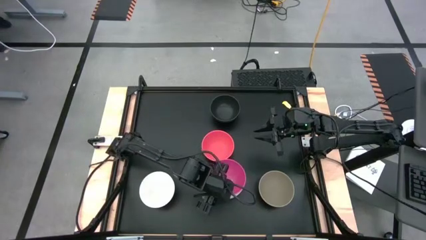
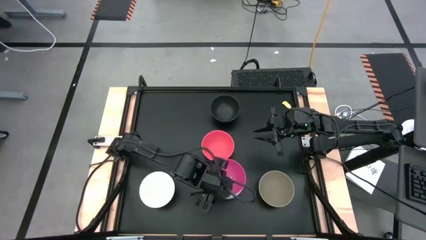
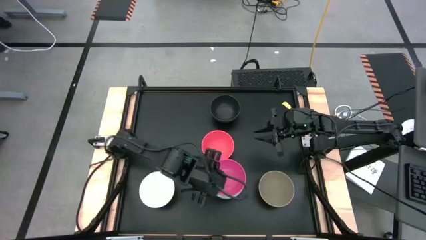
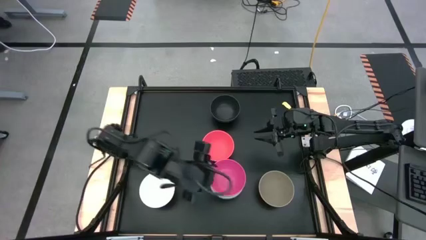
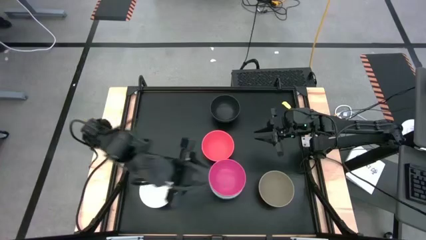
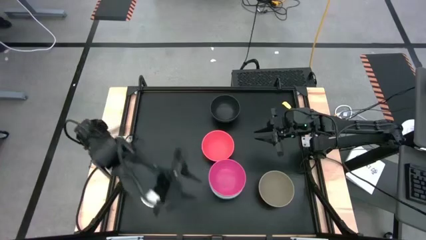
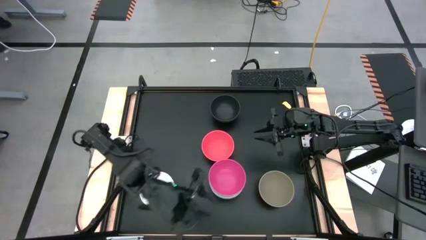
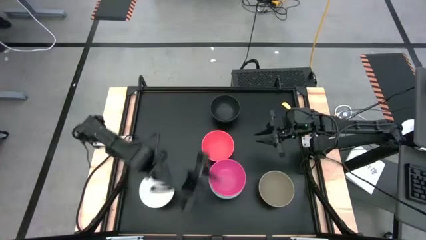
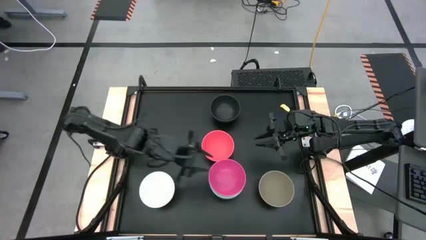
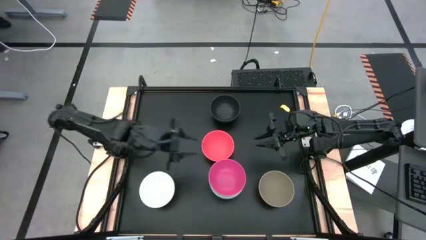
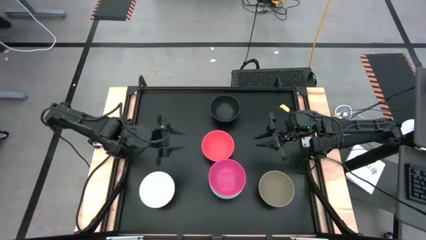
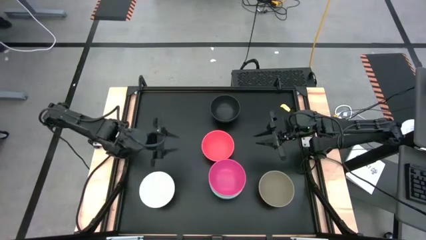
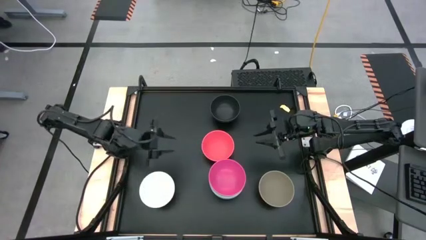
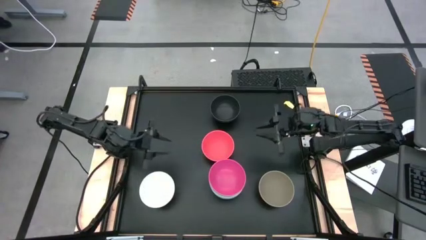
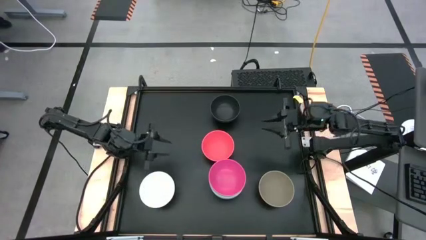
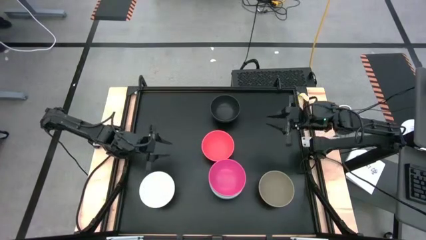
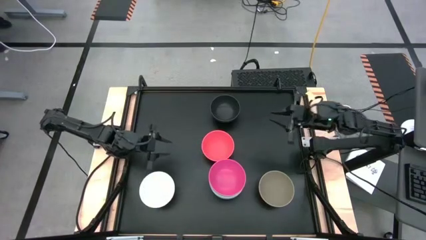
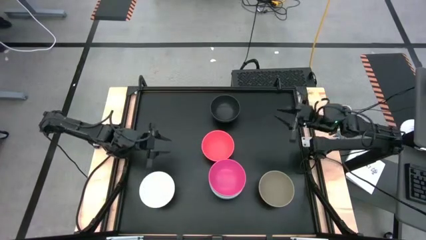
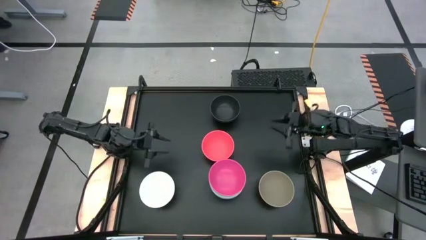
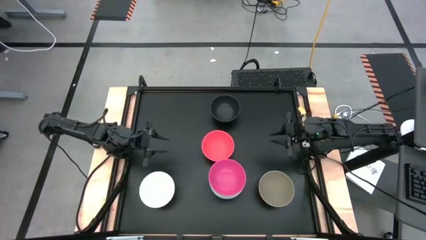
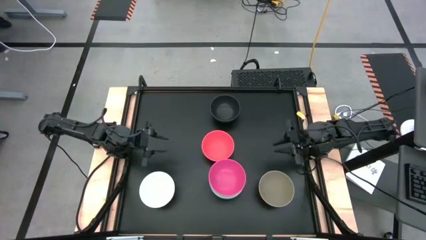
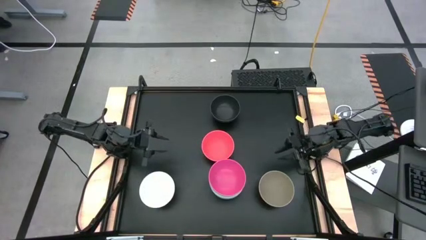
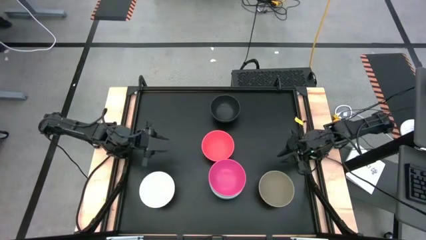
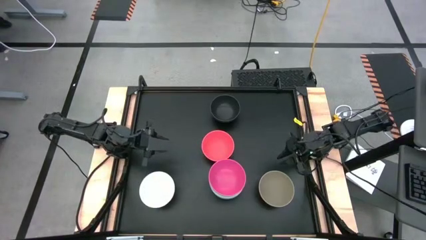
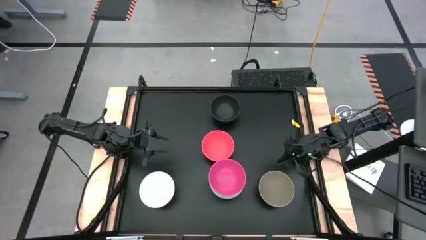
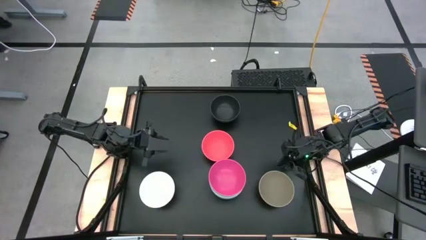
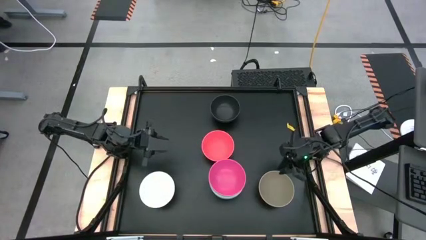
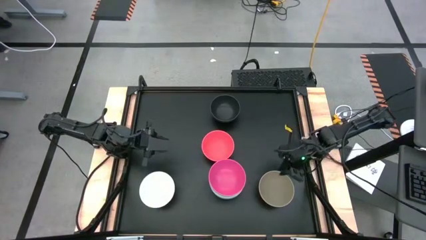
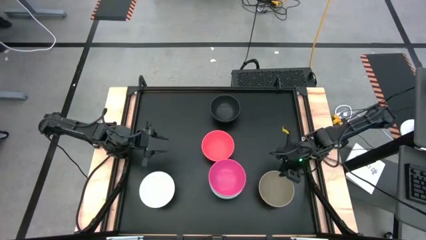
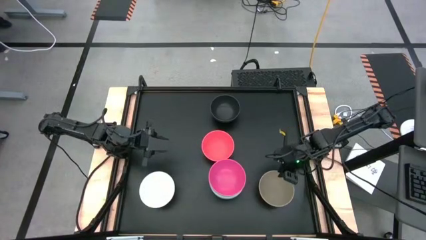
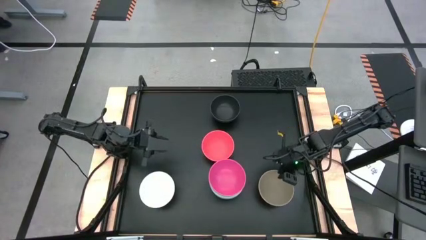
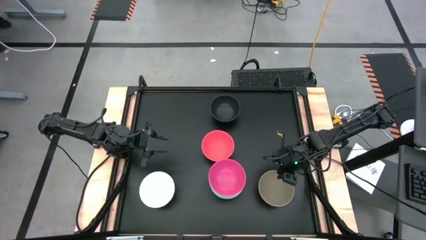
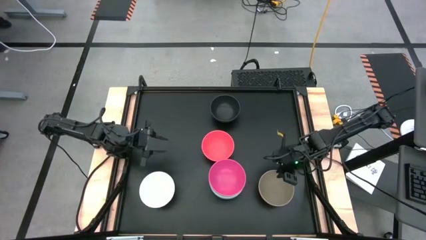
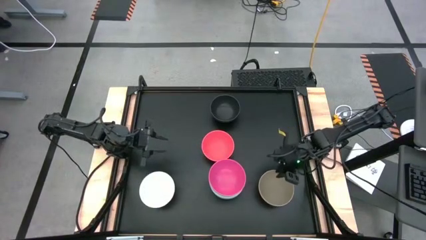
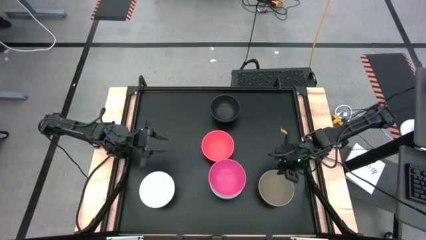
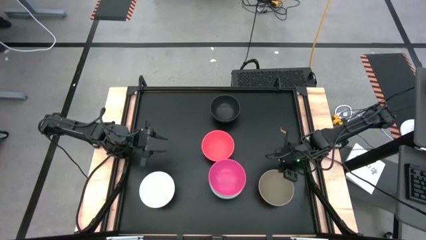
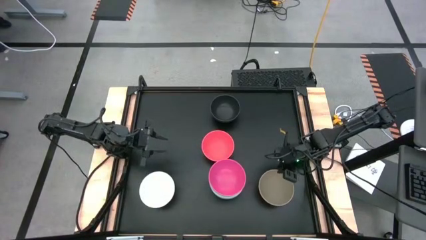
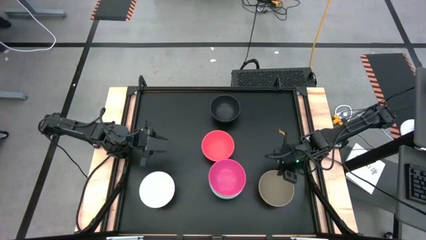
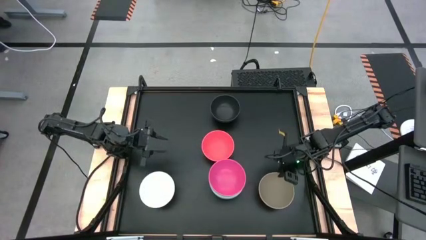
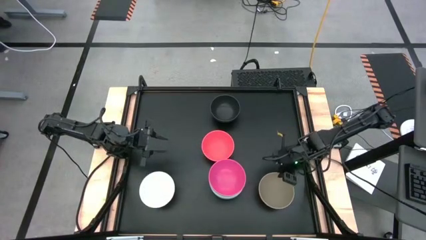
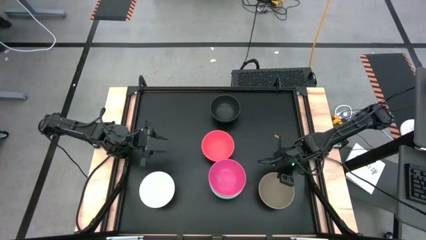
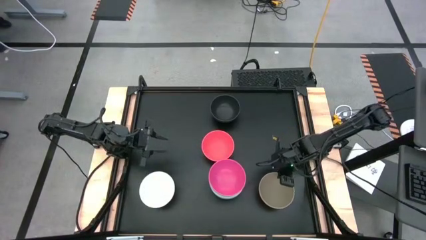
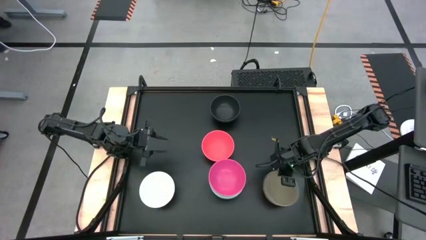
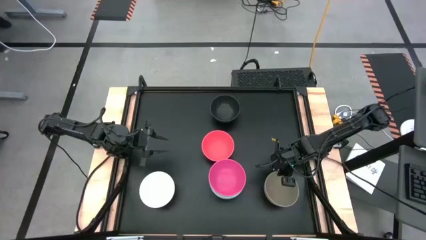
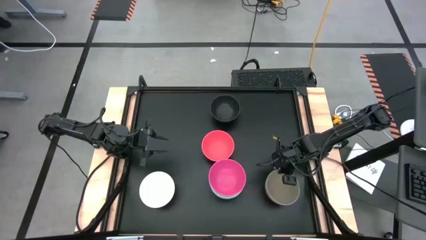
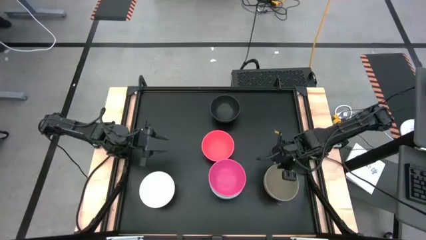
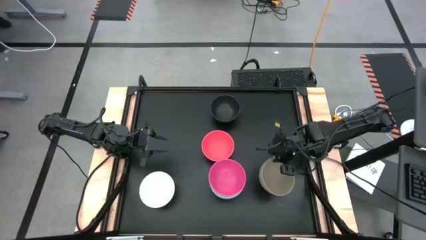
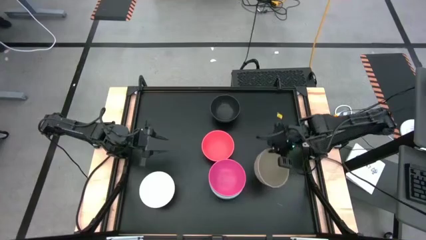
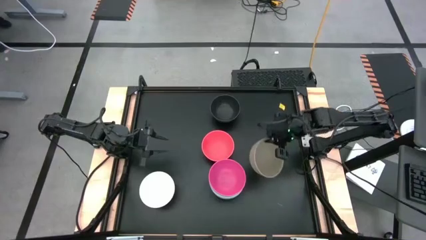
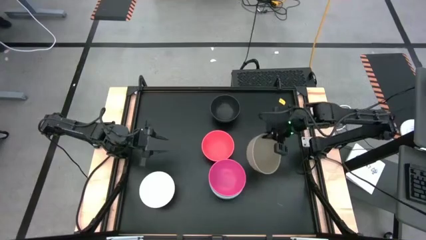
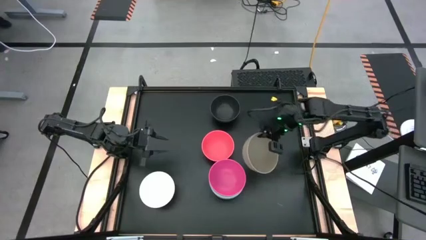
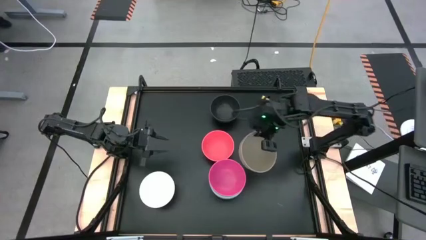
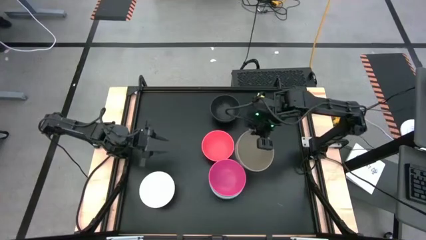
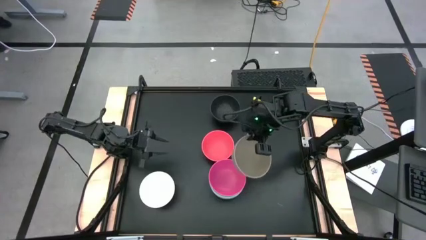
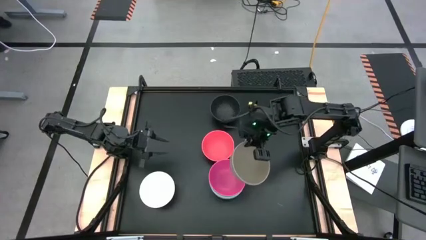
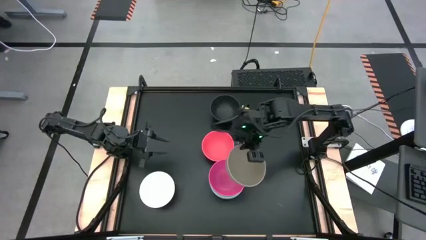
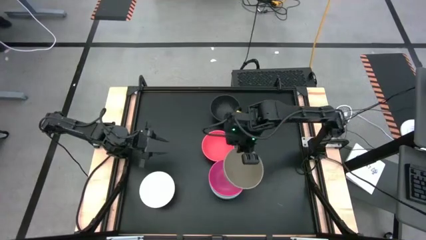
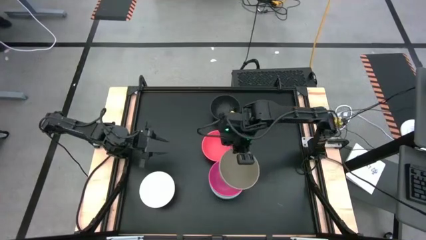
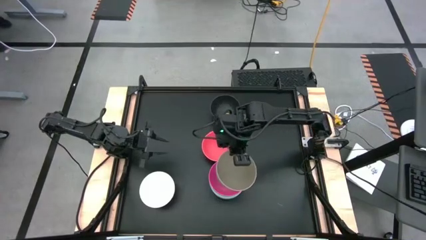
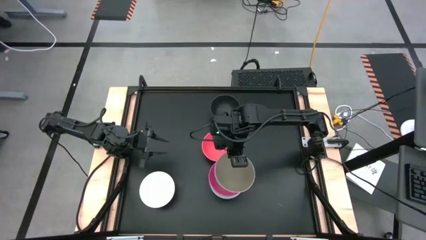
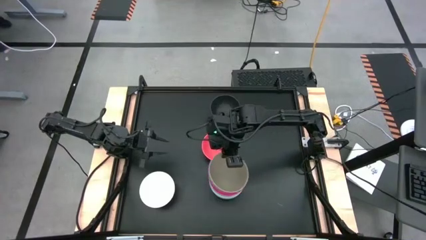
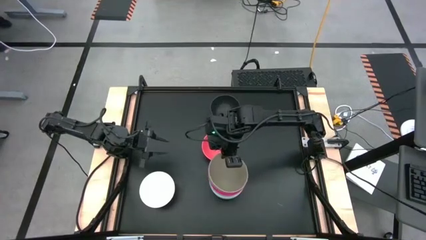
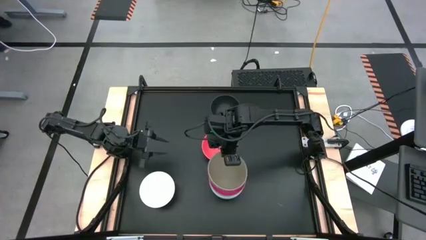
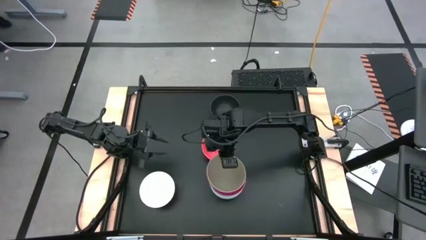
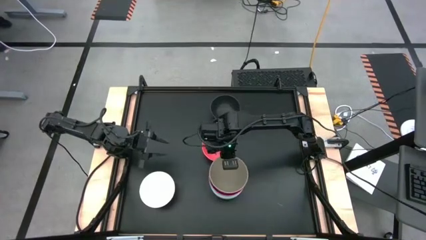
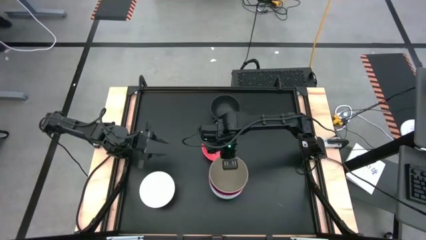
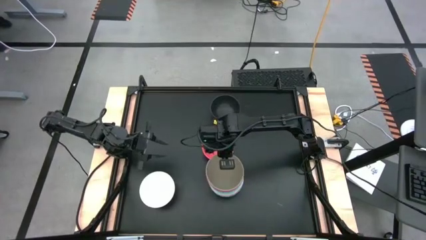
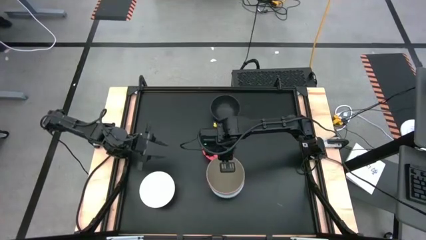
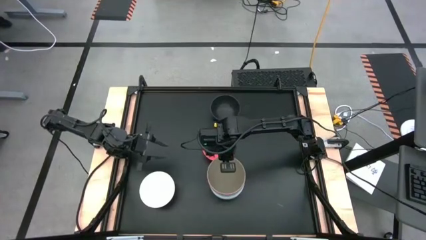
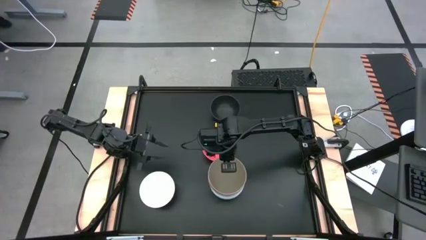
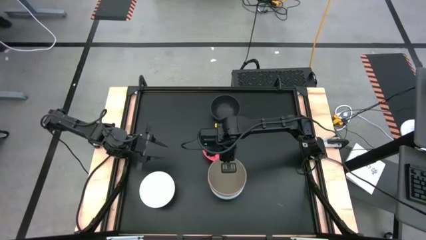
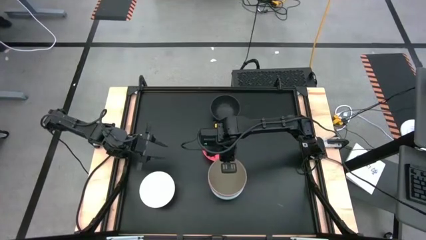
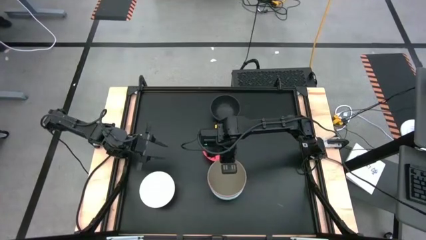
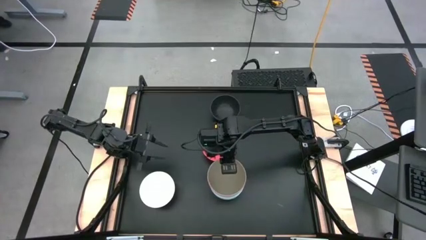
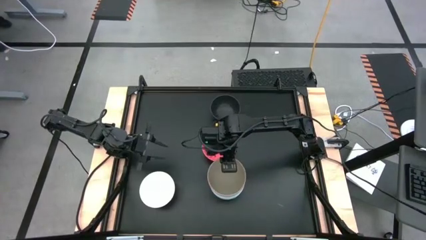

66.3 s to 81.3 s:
Task: Nest bowls inside each other
Stack the gray bowl on top of the pink bowl
